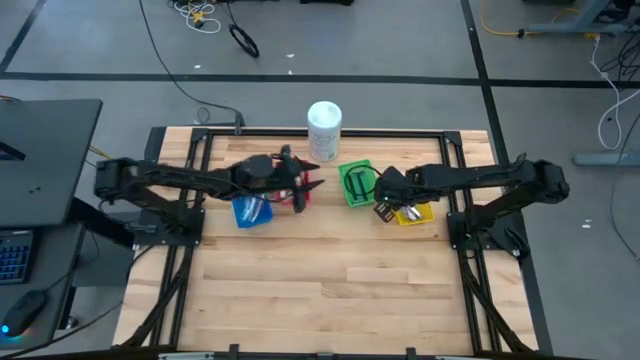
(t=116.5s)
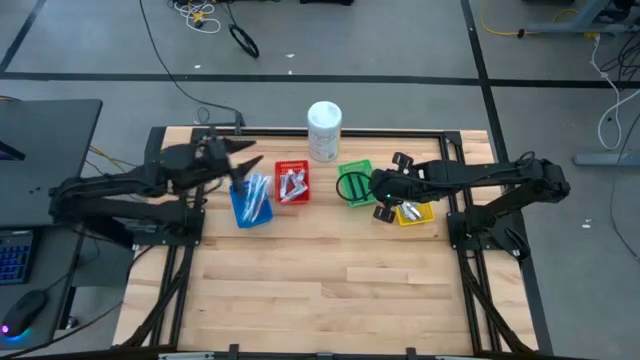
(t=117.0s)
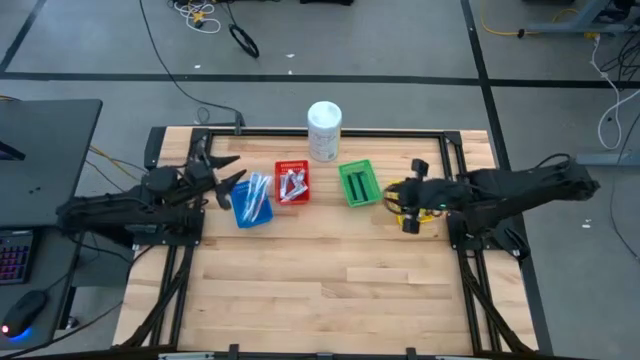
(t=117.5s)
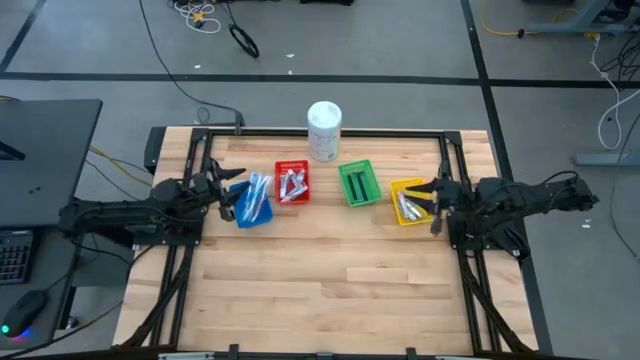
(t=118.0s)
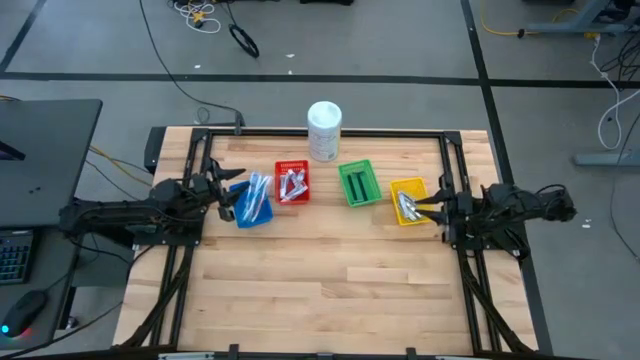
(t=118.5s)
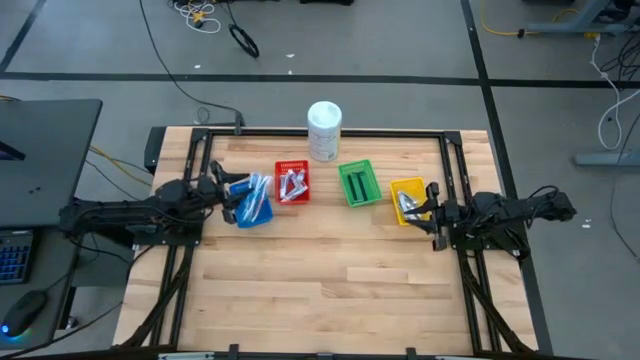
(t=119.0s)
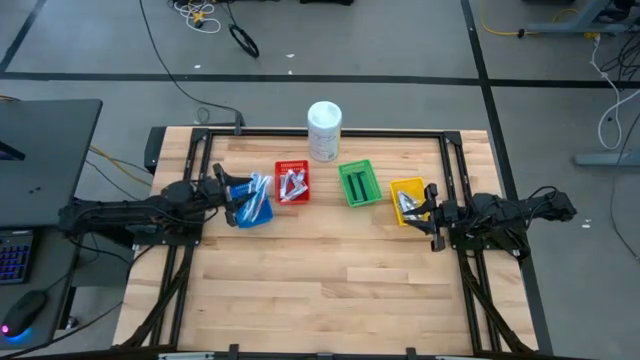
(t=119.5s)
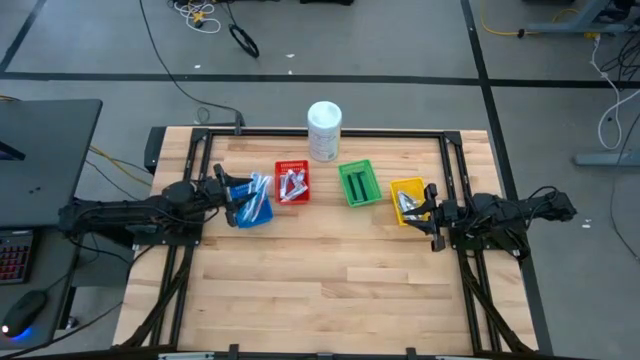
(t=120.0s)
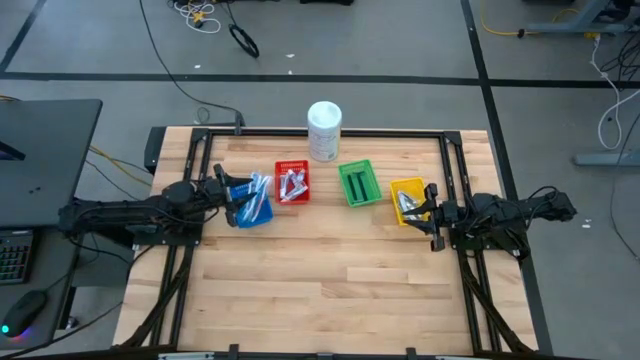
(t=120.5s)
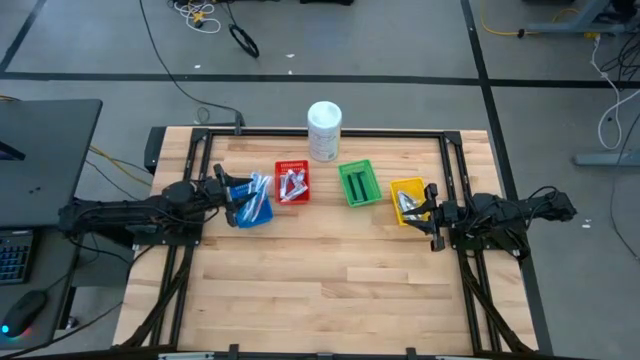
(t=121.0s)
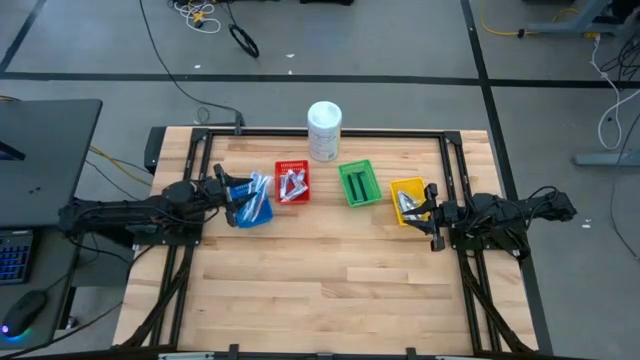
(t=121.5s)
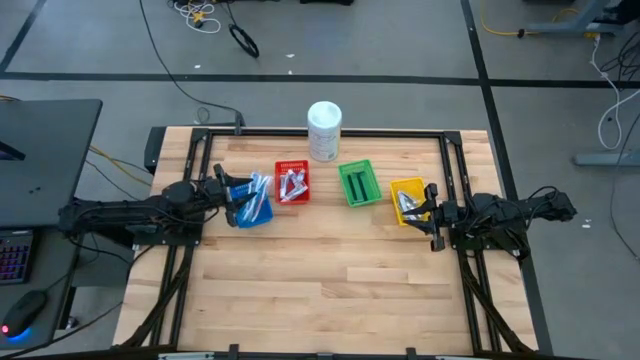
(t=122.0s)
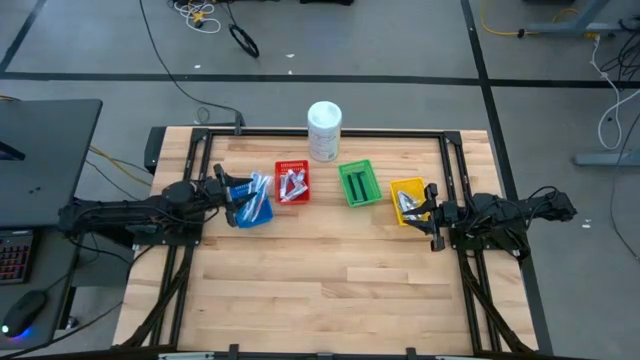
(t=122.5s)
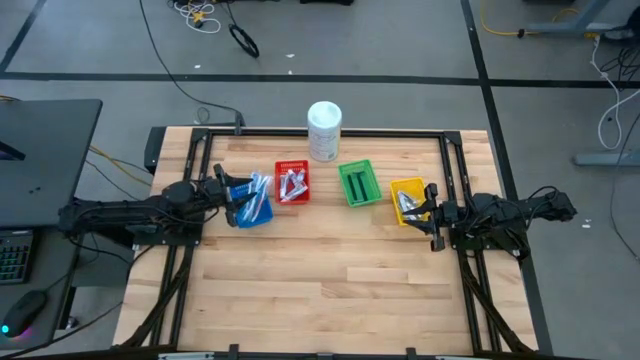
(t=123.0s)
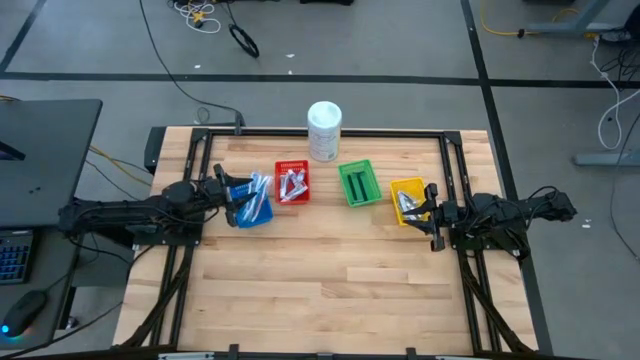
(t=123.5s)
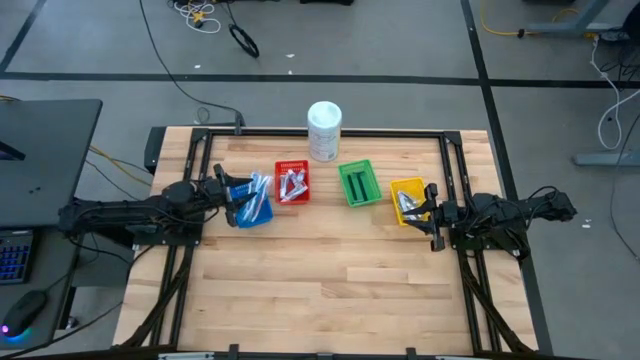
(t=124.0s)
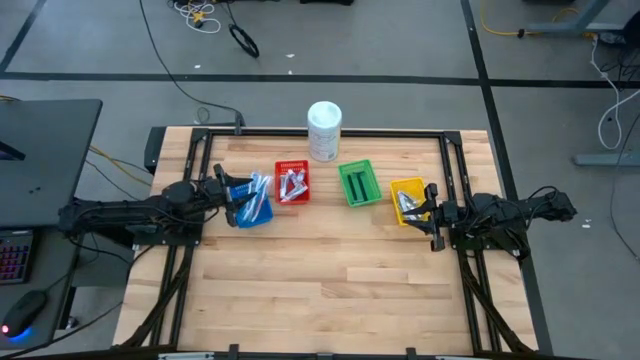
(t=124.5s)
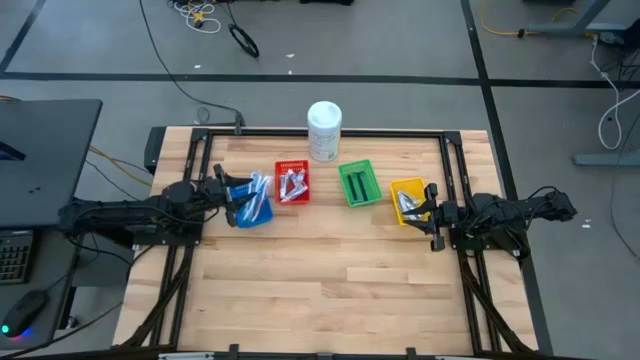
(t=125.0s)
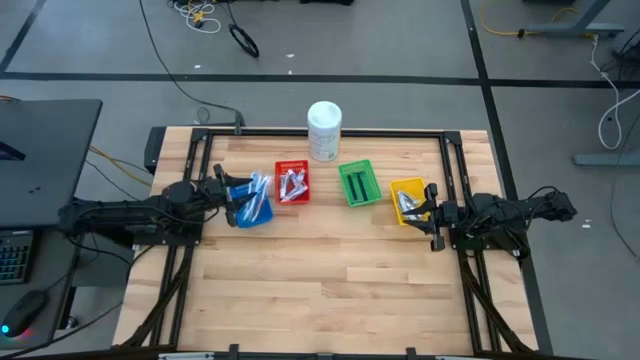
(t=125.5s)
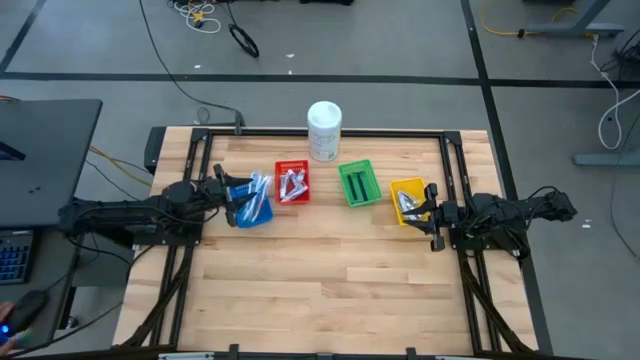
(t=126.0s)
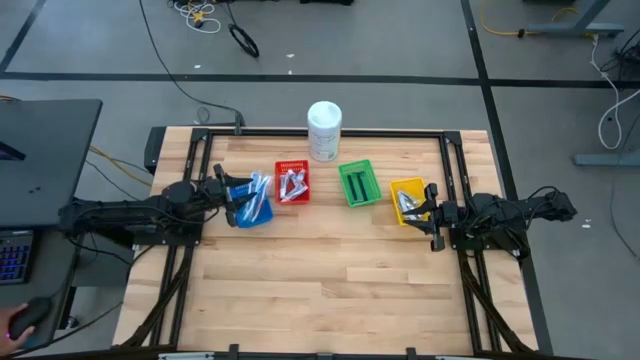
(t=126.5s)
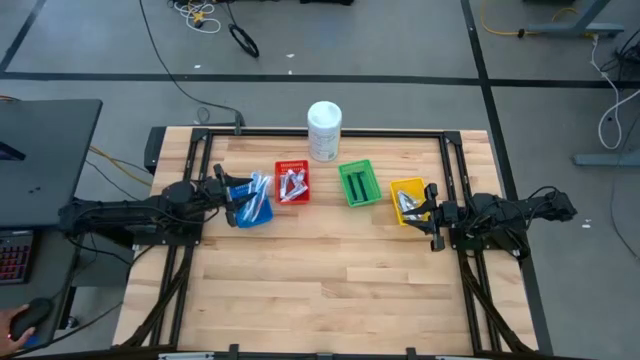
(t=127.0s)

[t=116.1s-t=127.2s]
Task: Pick & Place Travel size toiletries
Return to Home Position

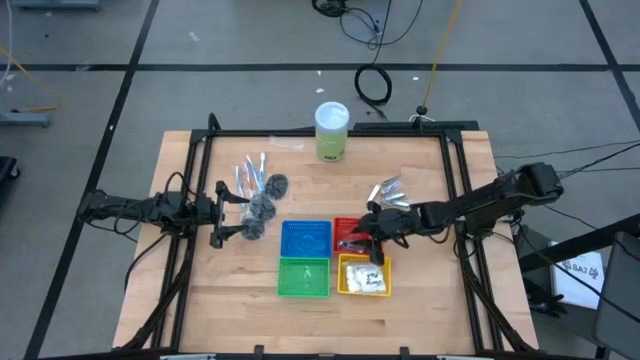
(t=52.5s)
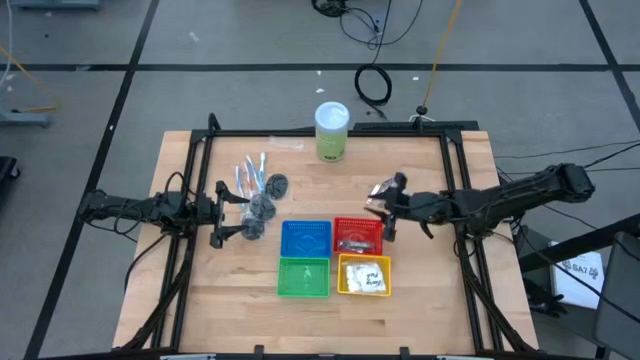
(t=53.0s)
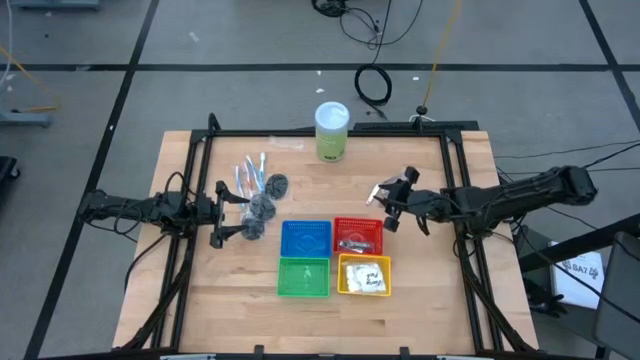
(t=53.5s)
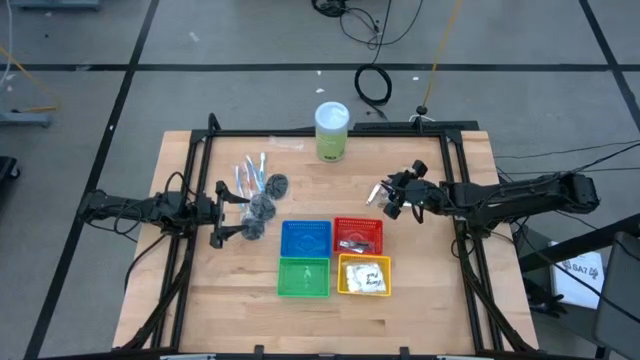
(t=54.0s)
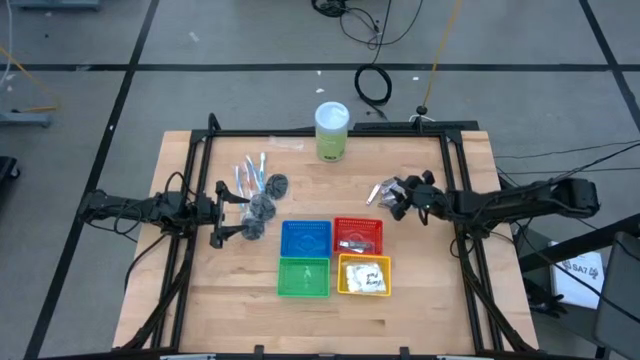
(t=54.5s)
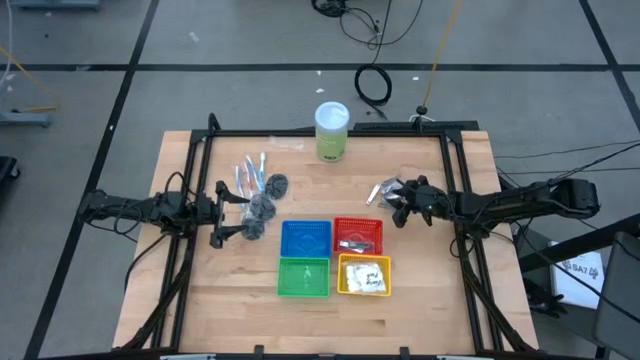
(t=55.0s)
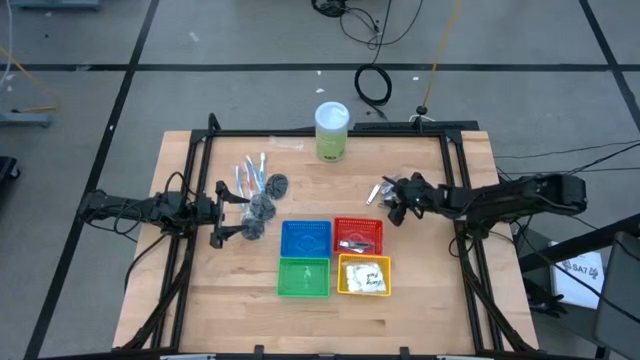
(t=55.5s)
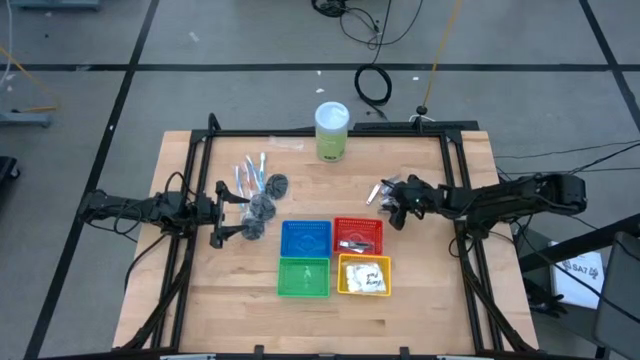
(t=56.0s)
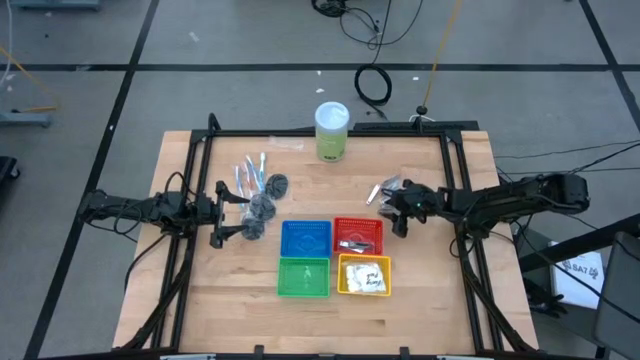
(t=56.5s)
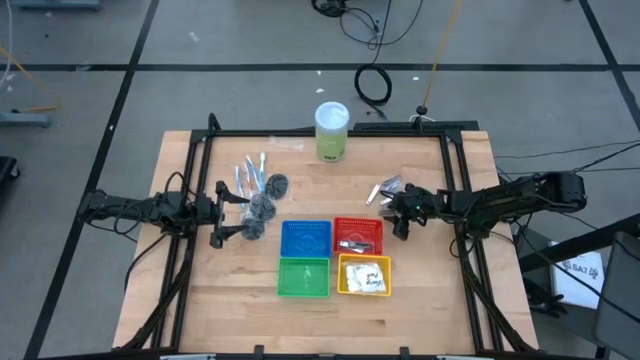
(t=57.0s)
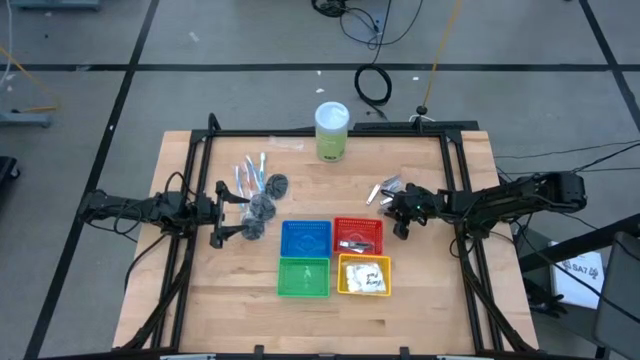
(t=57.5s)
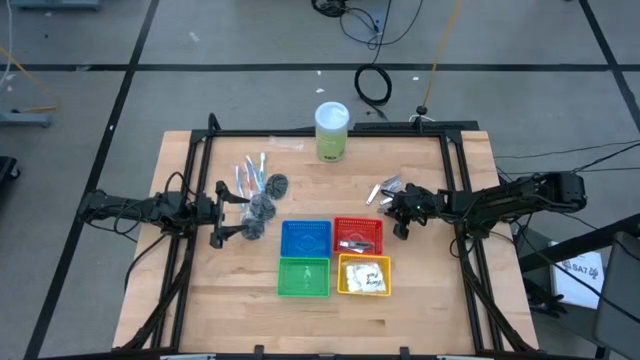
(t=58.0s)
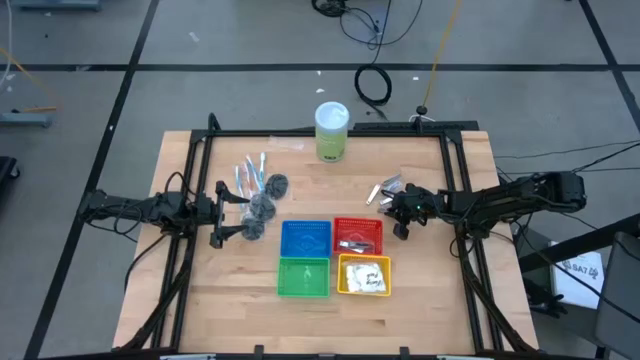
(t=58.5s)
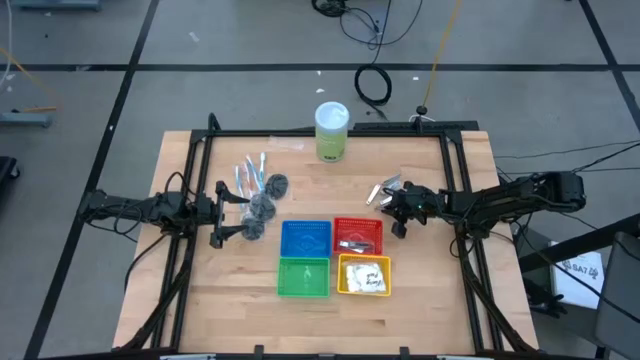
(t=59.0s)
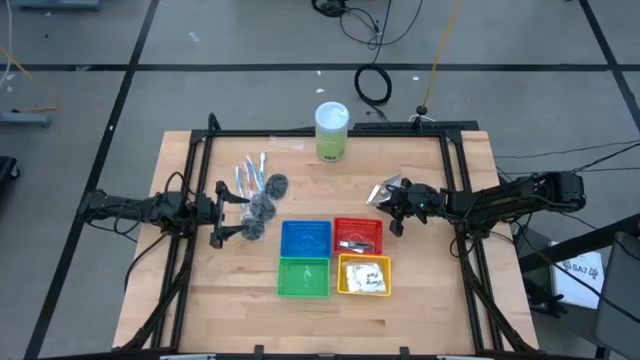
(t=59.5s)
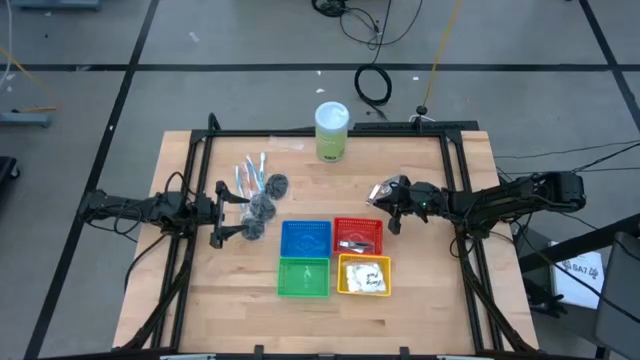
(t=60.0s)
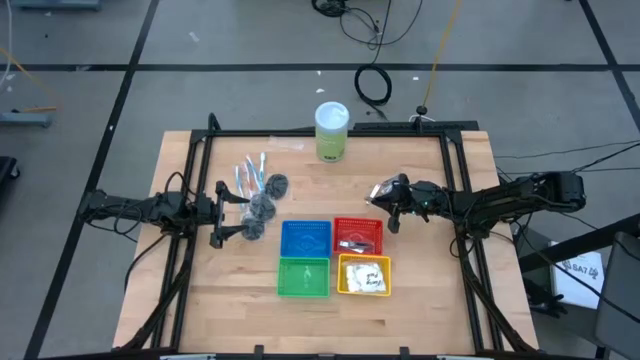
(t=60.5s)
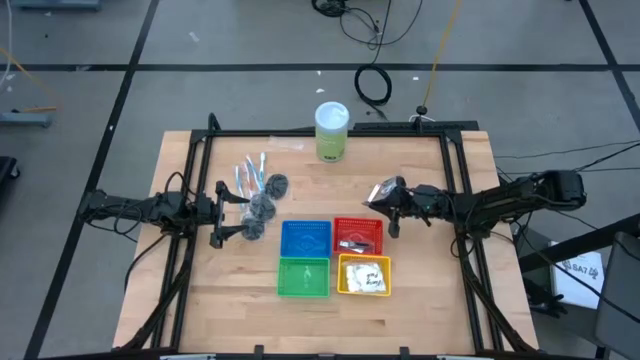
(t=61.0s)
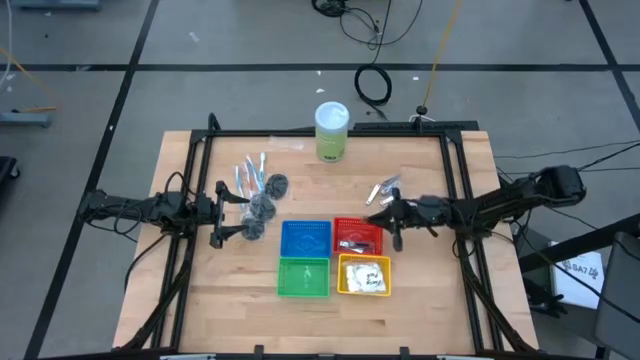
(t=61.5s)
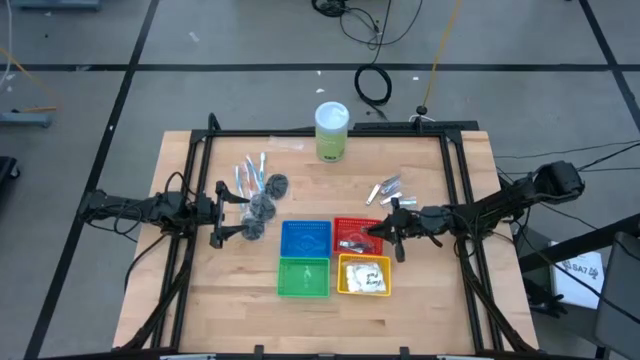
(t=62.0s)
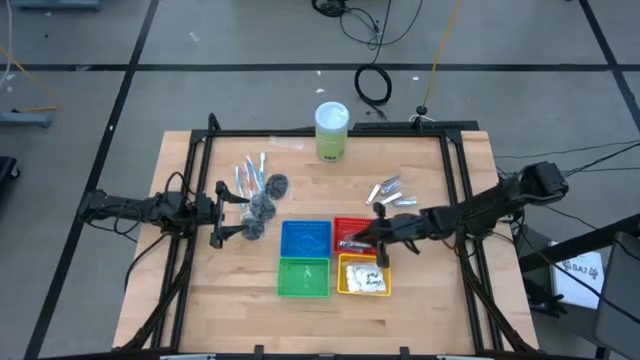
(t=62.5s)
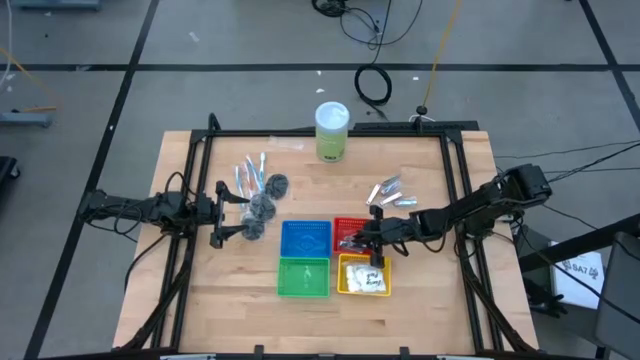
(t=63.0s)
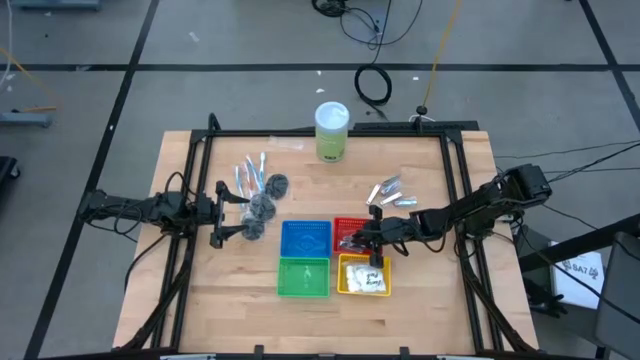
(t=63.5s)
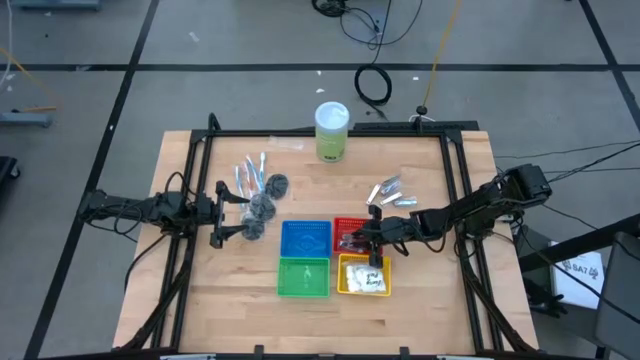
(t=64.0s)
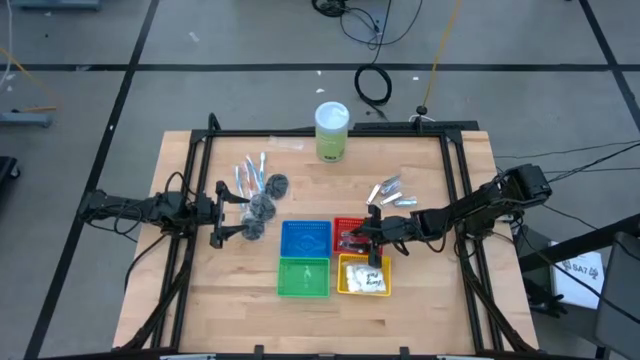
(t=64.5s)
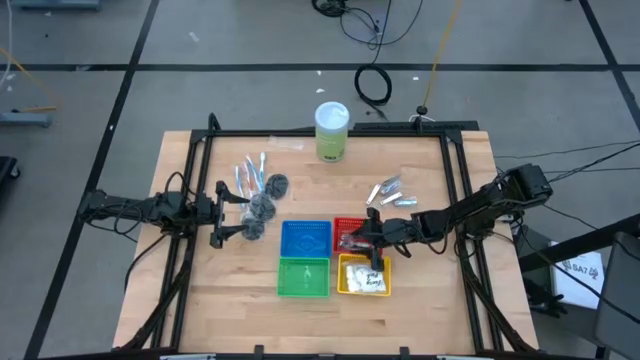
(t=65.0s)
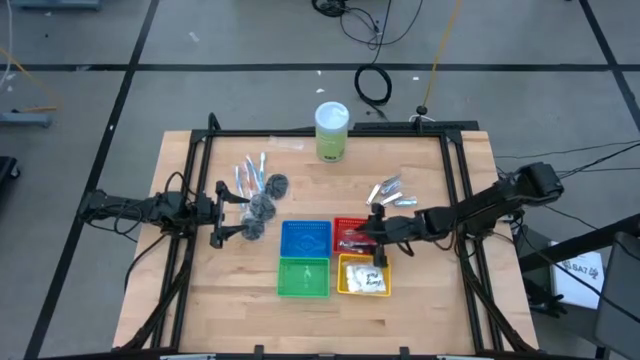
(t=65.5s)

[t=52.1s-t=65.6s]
Task: Pick & Place Travel size toiletries
Put the nail cutter into the red basket
